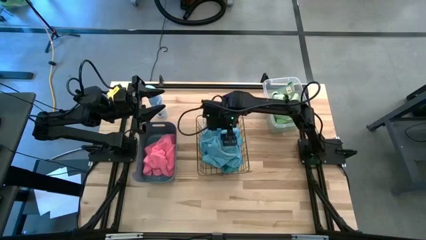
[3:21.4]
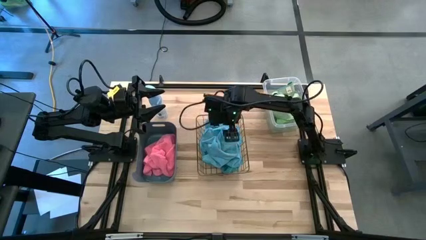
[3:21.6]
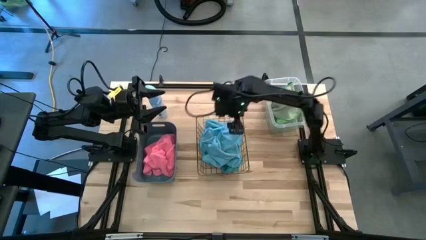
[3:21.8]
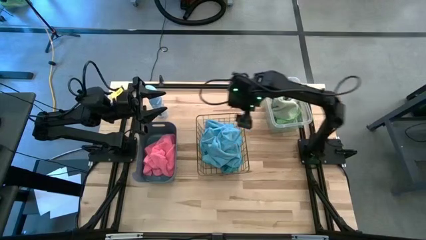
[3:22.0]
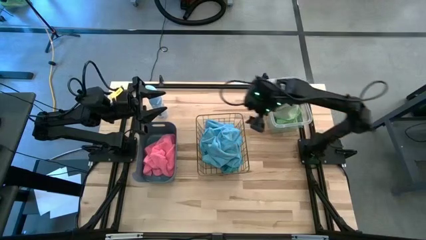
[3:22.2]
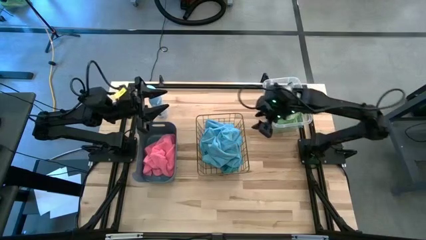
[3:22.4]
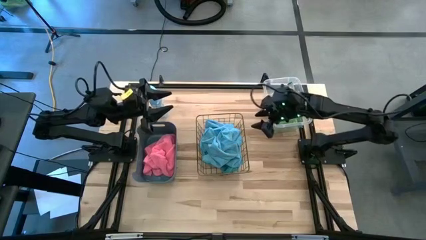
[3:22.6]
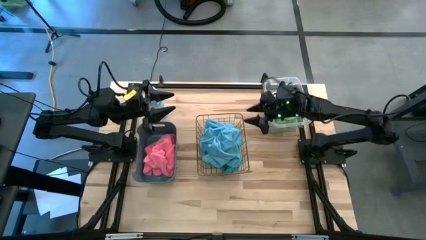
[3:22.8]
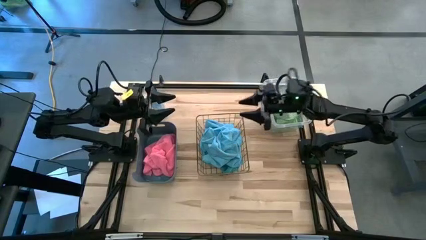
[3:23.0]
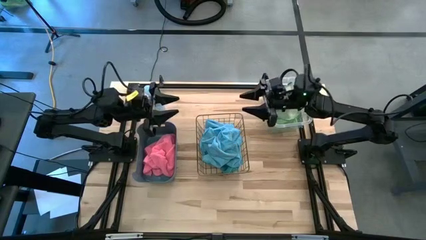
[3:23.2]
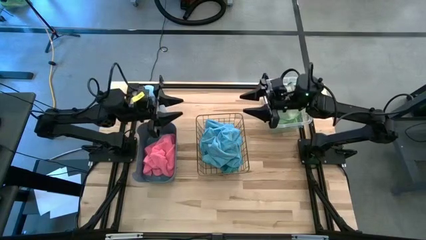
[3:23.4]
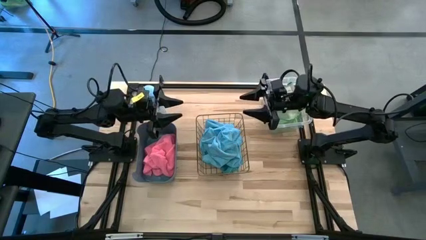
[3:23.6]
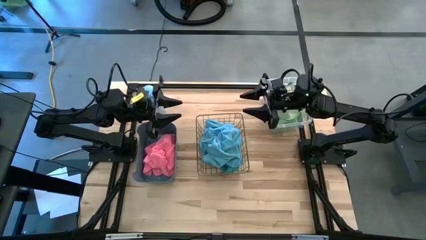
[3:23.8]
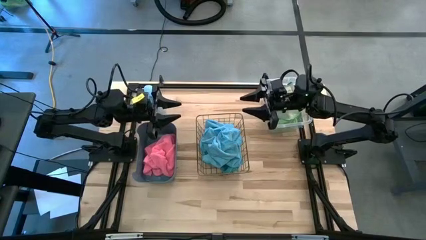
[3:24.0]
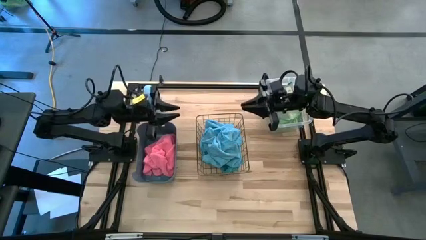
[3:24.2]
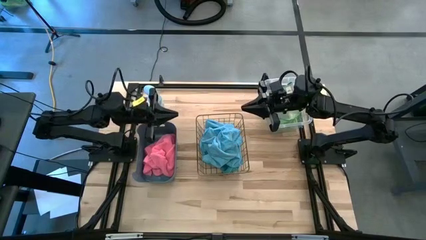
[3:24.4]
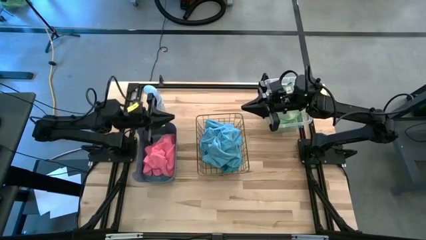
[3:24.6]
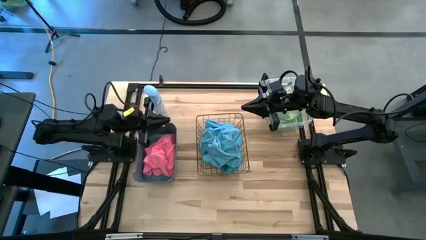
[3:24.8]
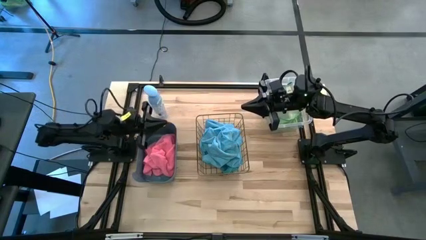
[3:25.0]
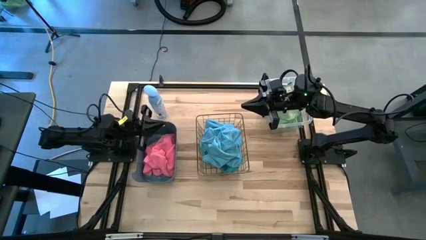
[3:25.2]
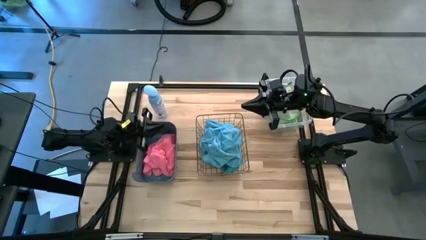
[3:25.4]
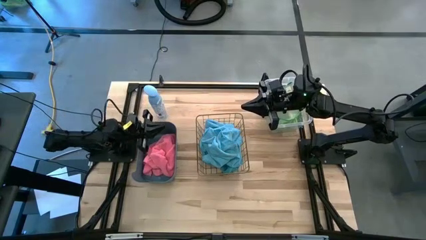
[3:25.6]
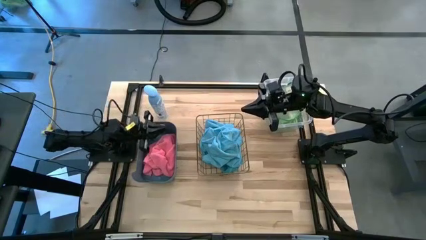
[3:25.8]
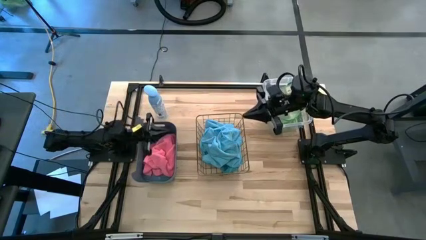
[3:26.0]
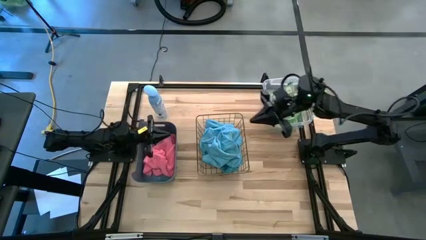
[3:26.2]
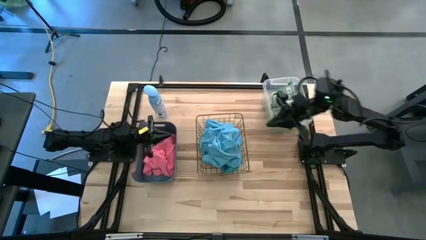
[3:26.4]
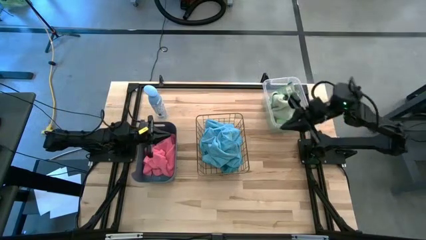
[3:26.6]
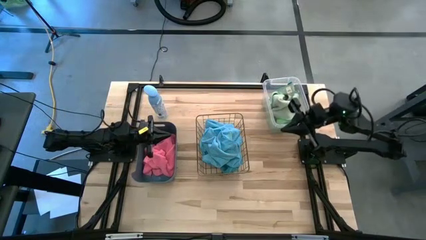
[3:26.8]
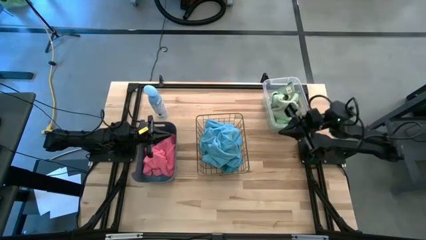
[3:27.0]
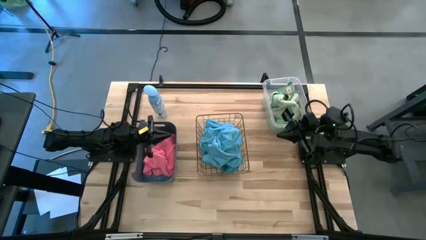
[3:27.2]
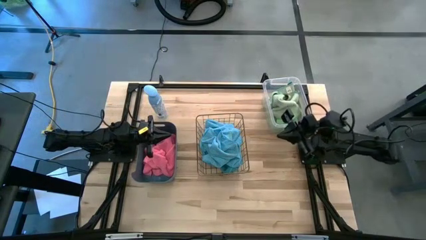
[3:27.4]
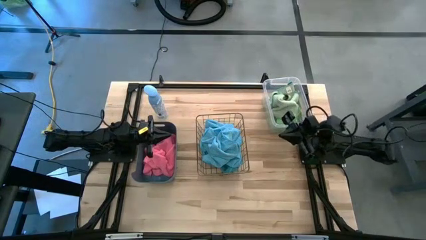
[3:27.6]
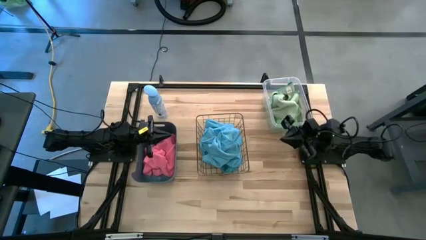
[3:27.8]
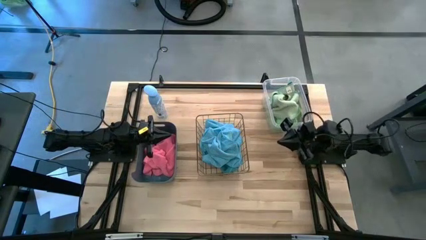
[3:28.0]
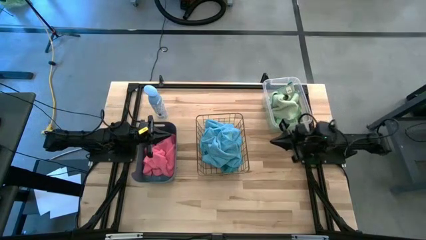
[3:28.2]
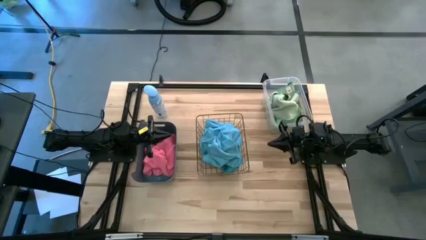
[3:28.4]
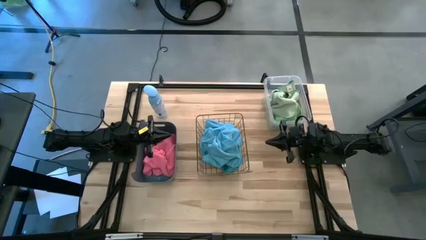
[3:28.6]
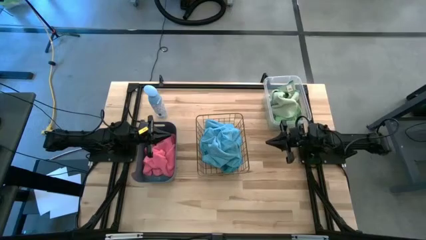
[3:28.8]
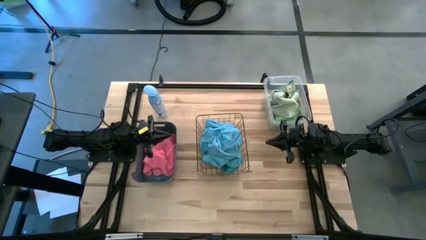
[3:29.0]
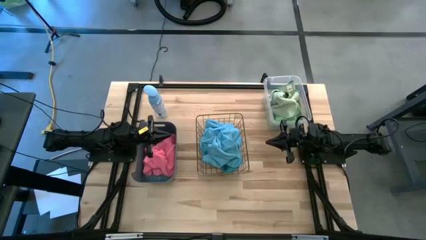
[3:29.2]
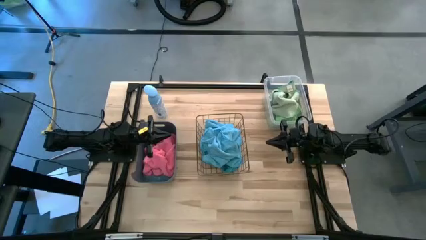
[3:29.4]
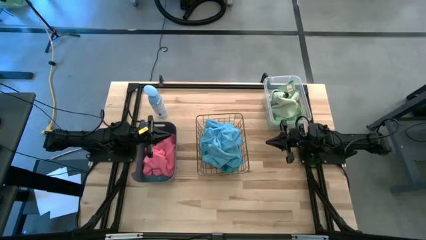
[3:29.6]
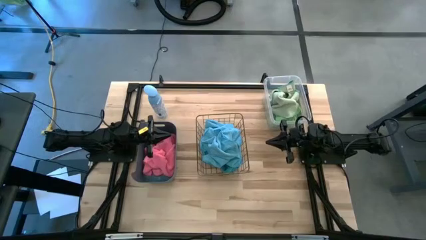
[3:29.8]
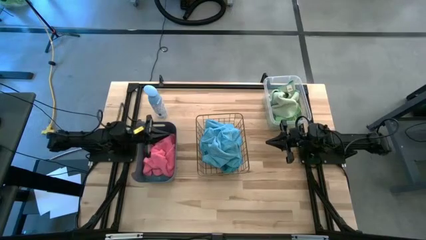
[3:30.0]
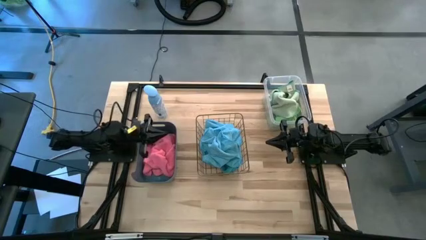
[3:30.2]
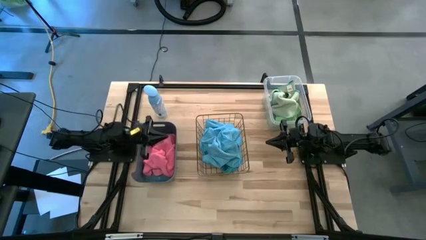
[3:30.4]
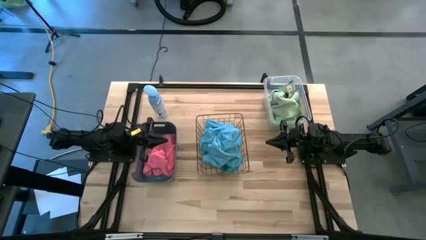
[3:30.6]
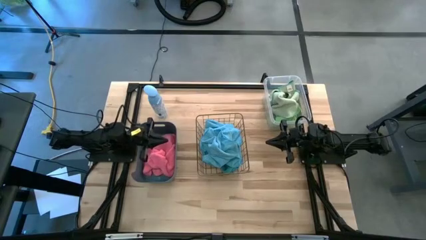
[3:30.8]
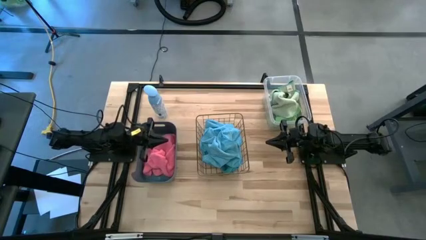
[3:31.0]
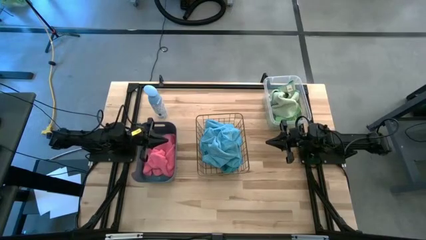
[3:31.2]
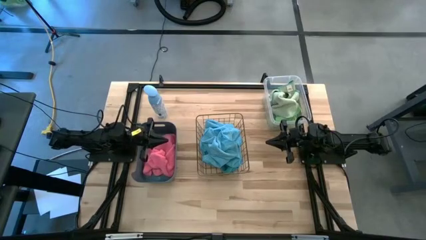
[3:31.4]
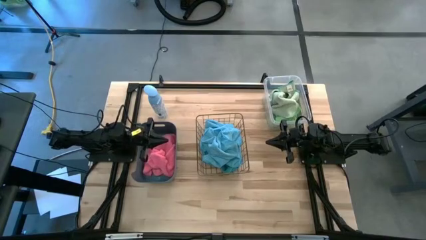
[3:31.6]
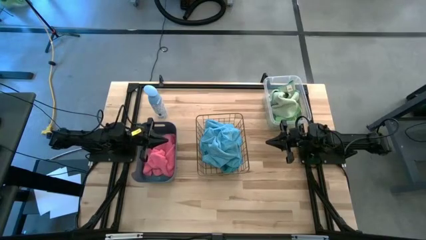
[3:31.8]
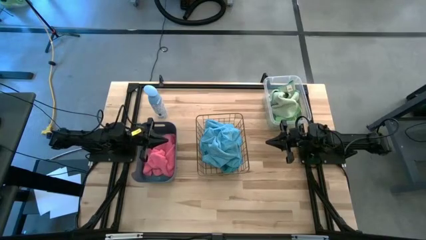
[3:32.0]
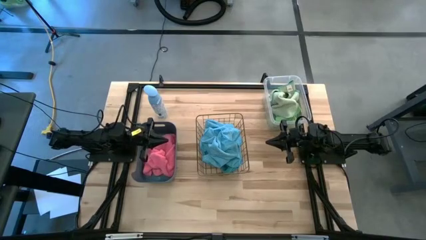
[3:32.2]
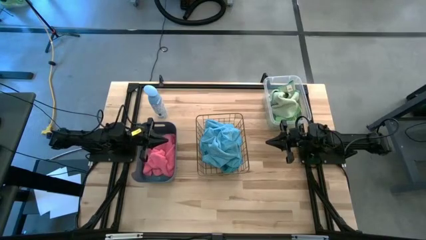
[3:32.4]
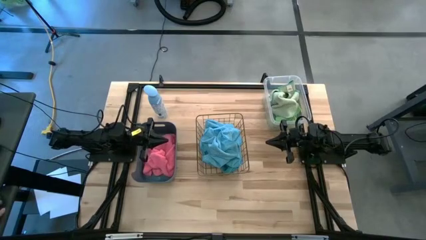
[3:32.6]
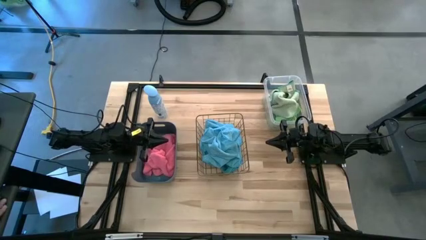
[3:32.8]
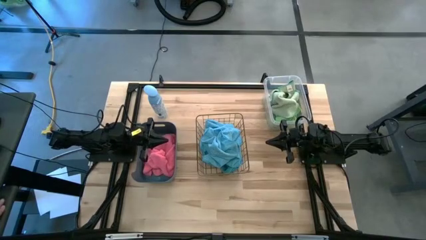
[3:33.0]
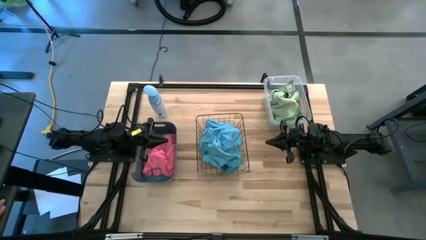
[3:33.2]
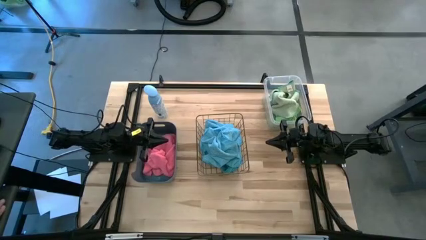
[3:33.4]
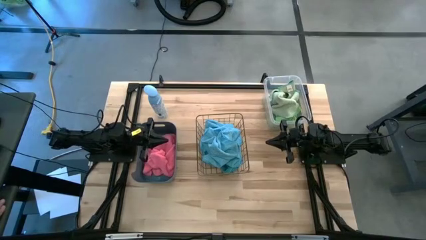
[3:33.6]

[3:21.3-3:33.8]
Task: Sort microfiber towel by color & place in baskets
Return to Home Position
